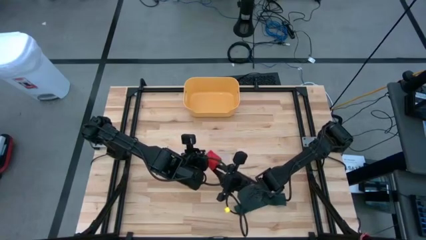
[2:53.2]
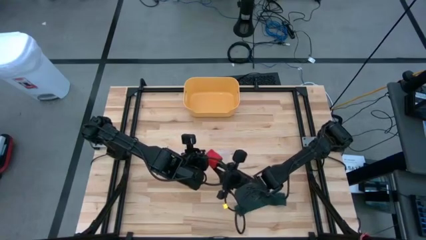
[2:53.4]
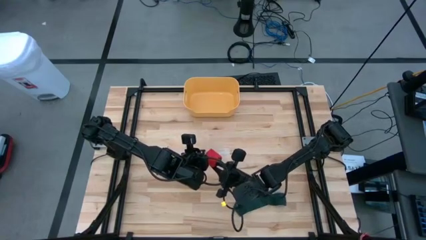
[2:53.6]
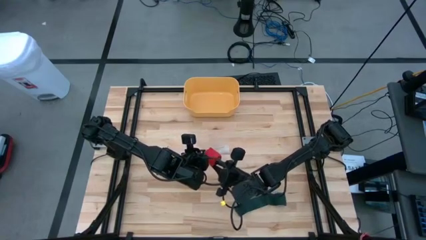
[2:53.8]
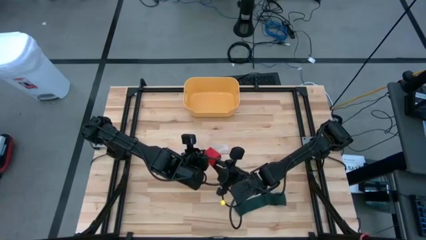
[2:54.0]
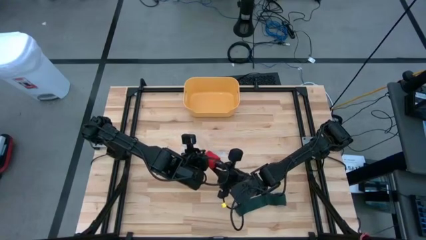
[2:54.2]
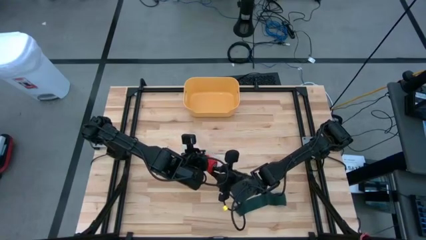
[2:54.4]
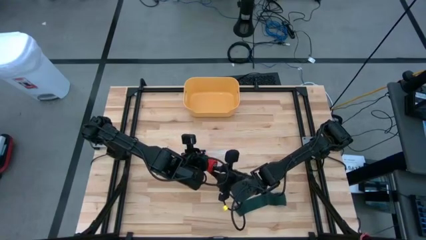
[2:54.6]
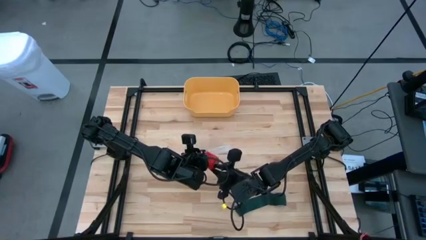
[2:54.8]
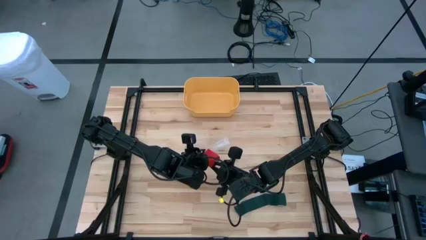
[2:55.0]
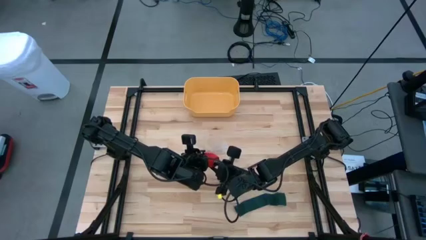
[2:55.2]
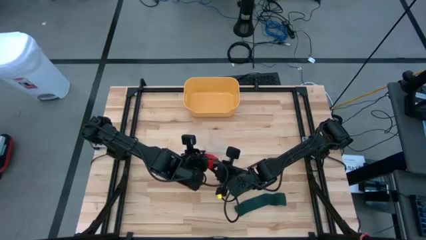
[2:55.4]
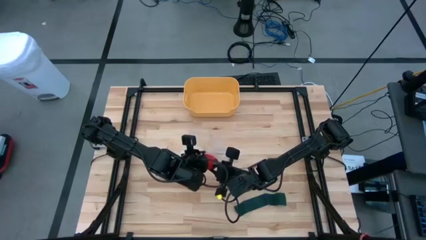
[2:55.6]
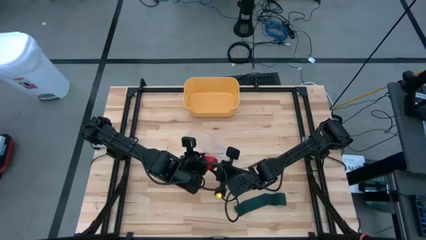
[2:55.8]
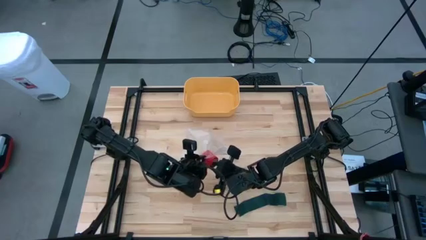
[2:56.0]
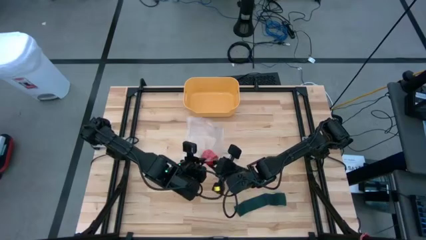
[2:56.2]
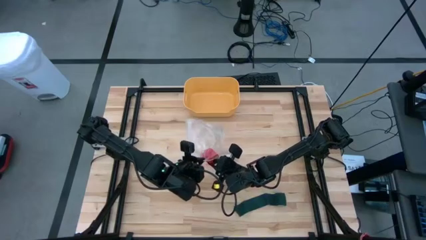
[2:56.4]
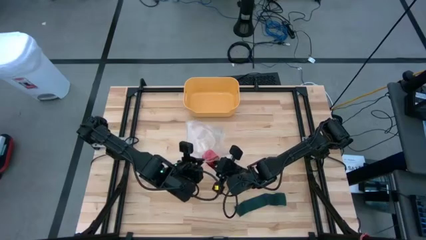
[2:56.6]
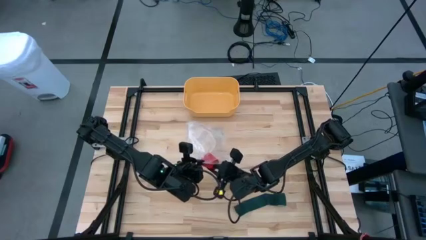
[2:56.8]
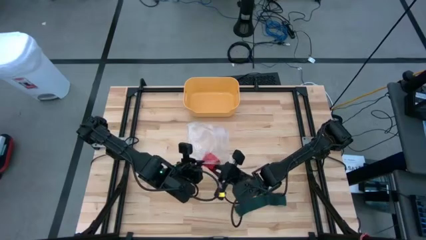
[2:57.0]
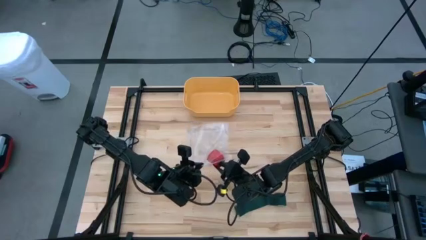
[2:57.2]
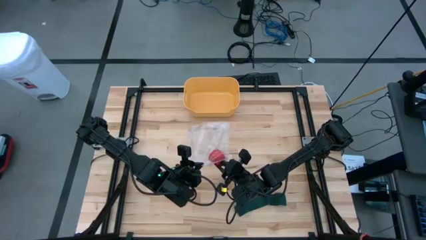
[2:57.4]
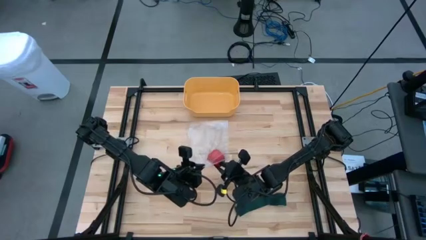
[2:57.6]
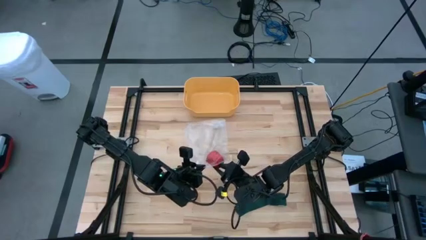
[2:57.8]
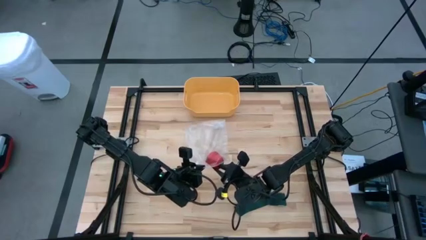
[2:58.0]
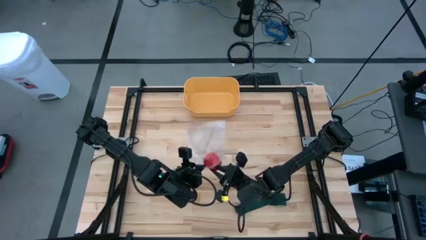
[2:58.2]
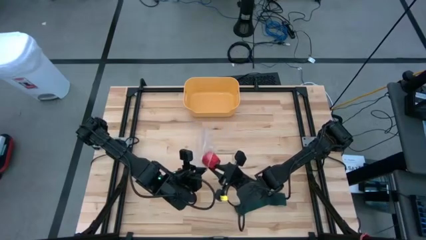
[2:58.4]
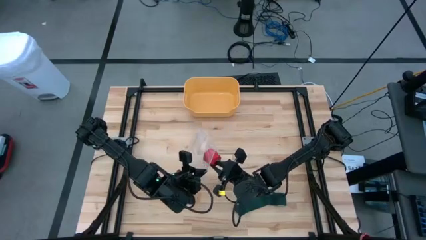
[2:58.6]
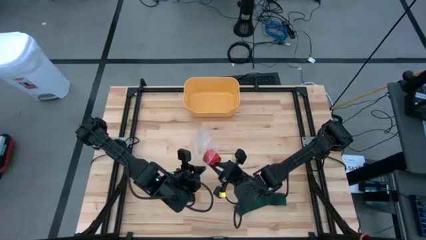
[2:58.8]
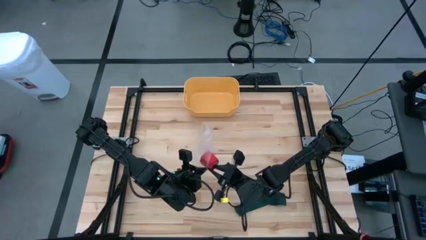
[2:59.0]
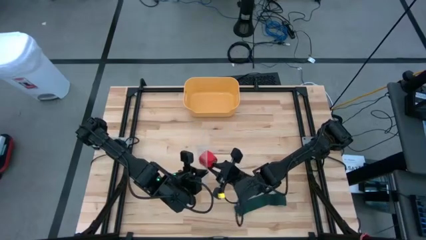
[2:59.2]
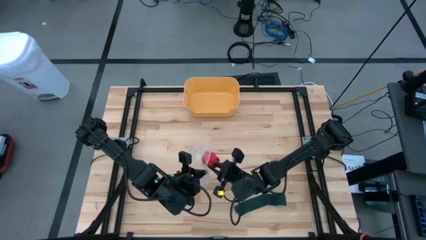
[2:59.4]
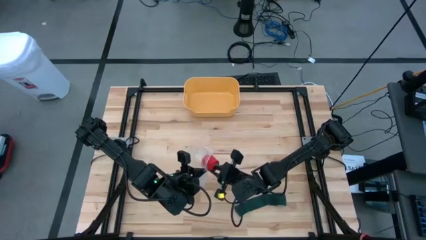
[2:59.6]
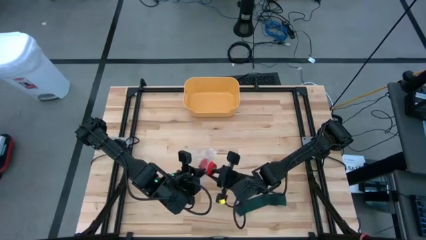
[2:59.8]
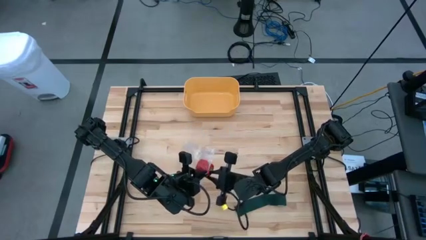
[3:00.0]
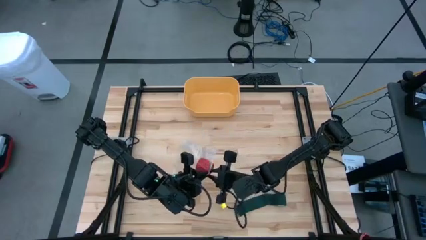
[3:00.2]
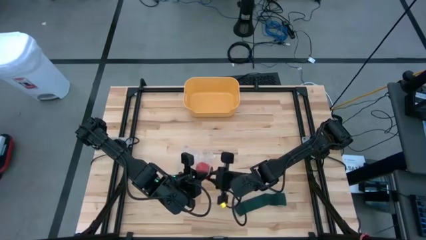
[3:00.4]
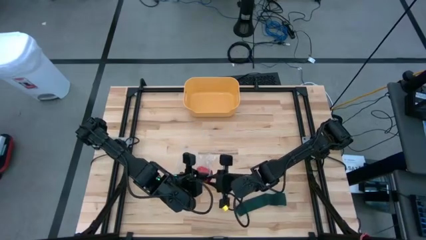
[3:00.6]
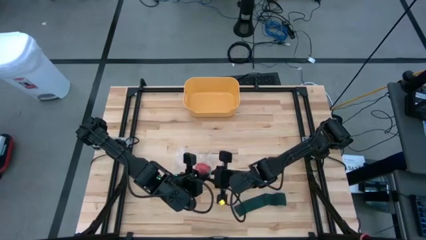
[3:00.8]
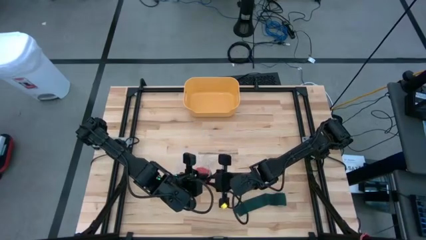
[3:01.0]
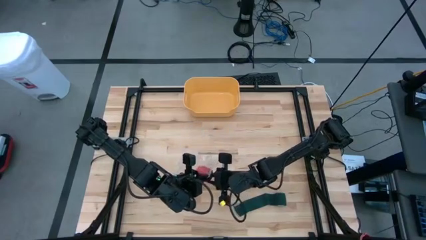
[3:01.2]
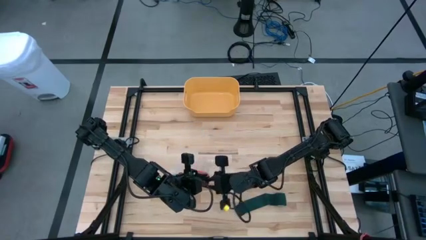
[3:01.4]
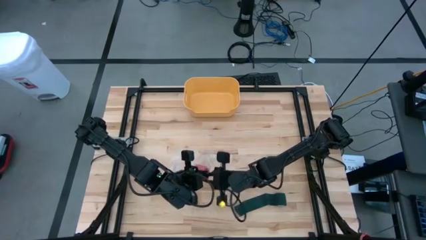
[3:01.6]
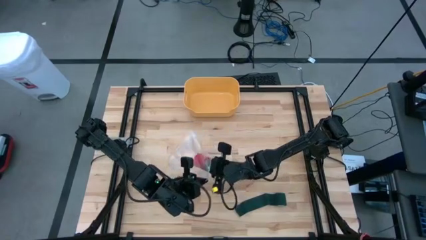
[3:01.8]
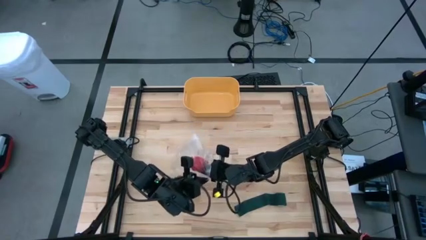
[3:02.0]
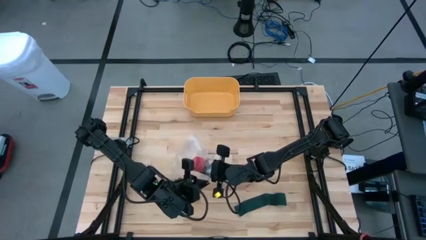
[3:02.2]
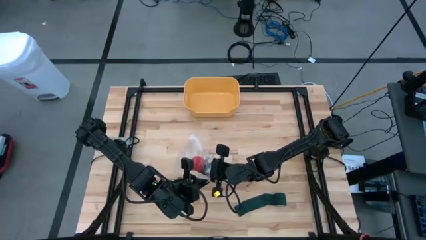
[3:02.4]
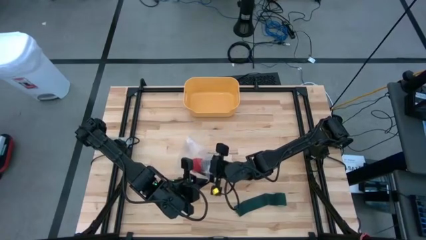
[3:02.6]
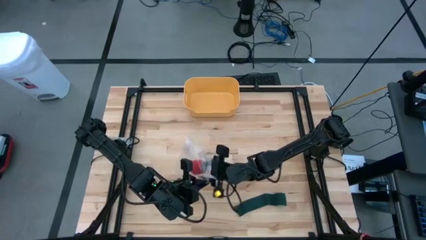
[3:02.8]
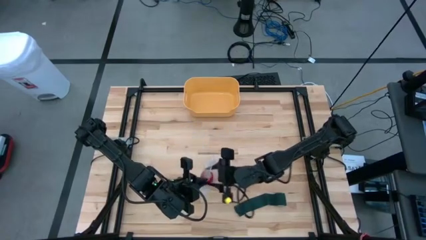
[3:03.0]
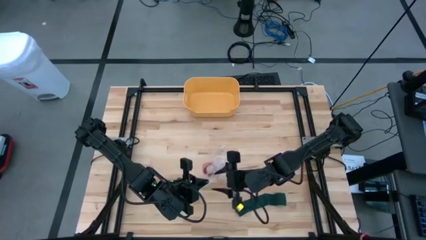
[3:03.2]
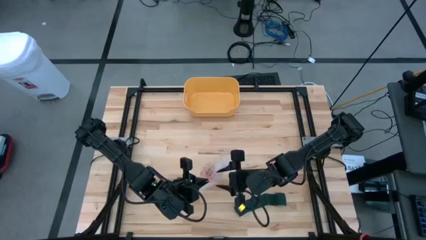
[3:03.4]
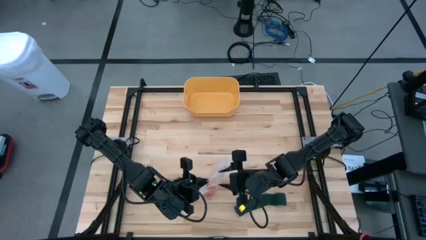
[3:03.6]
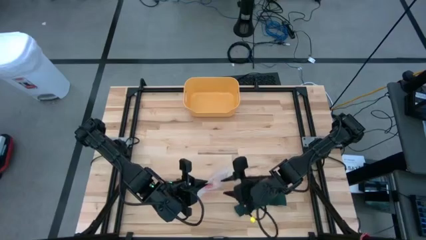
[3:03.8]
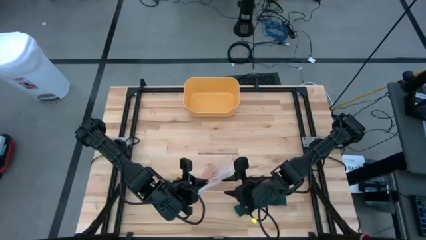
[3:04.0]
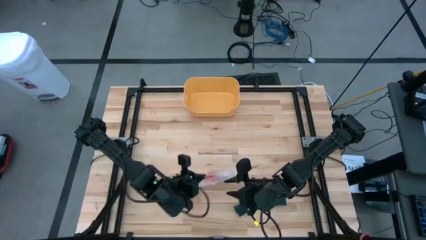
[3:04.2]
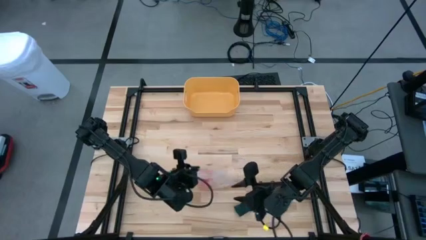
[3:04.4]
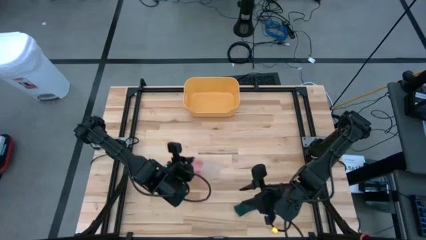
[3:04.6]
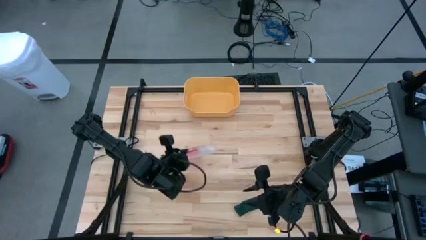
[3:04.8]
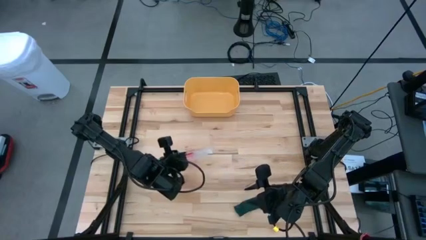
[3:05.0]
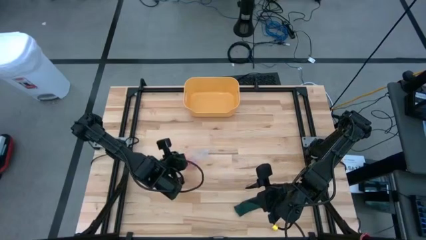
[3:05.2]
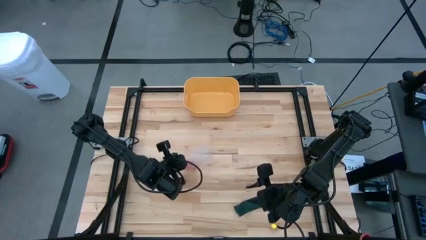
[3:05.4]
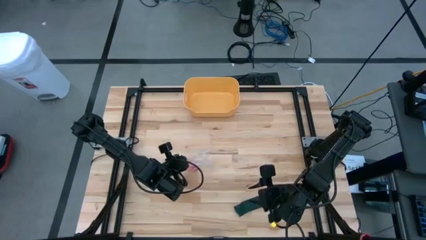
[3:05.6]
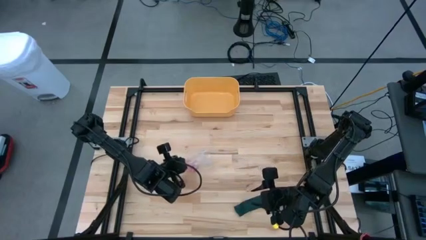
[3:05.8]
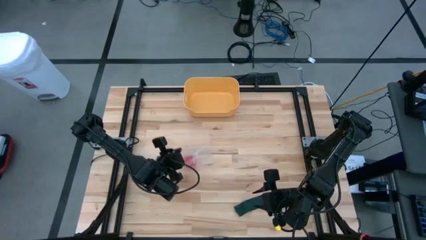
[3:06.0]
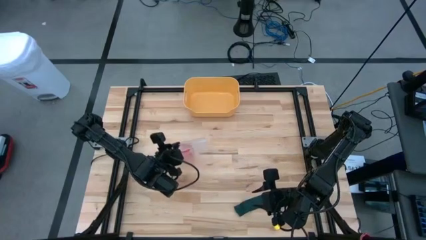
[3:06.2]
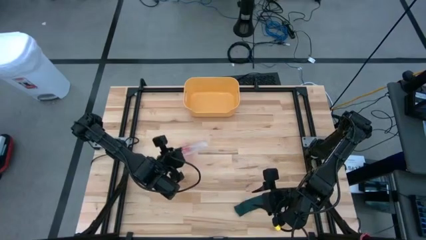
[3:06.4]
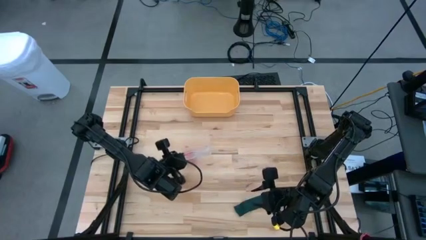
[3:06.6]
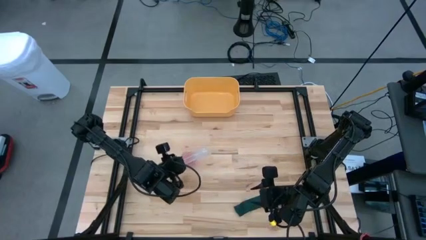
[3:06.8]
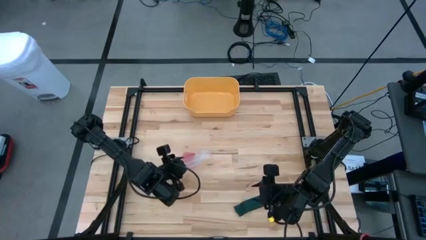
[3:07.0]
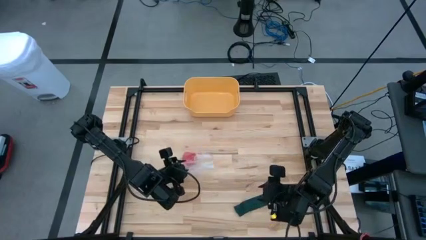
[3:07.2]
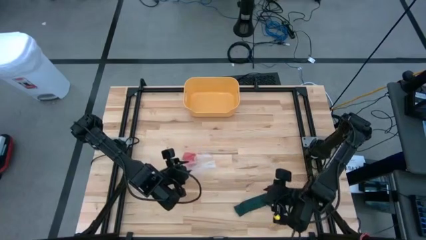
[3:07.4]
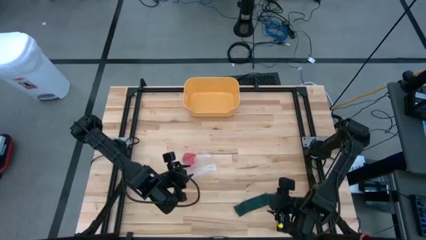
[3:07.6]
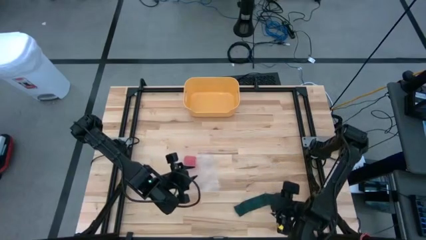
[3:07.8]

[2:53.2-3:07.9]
Task: Roll bandage
Put the rolled red bandage into the transparent zip bag

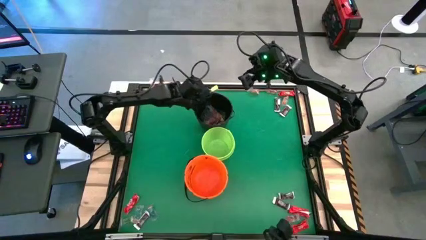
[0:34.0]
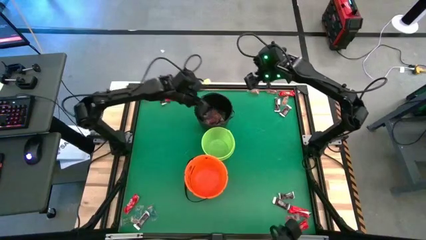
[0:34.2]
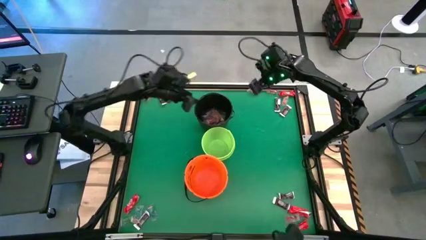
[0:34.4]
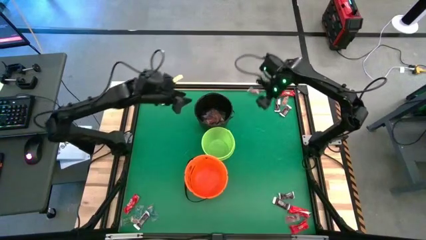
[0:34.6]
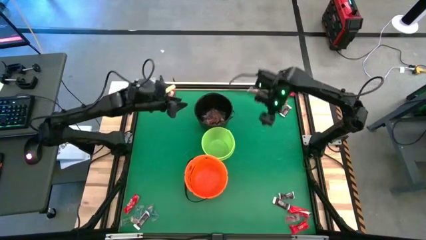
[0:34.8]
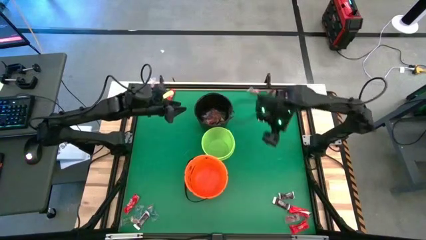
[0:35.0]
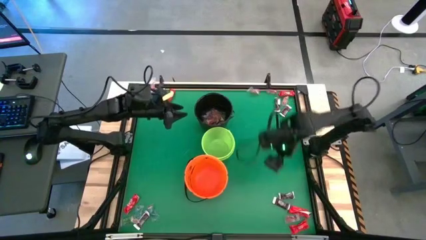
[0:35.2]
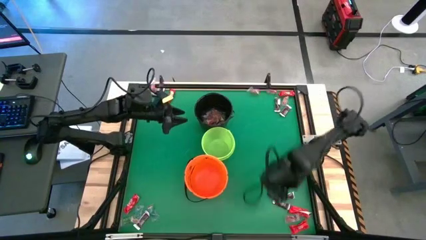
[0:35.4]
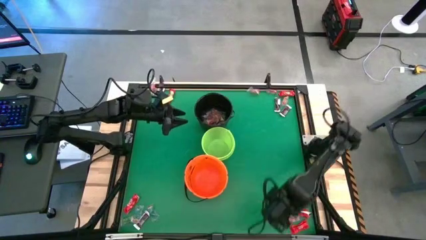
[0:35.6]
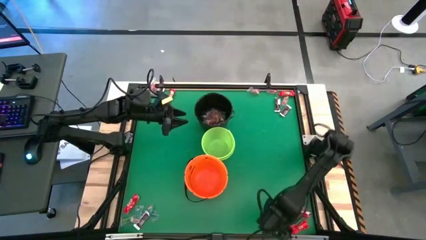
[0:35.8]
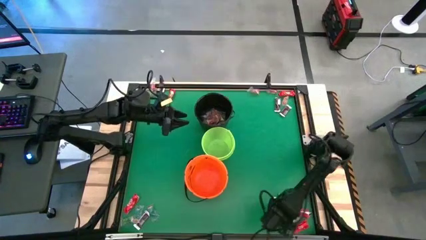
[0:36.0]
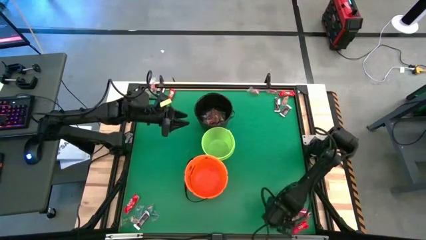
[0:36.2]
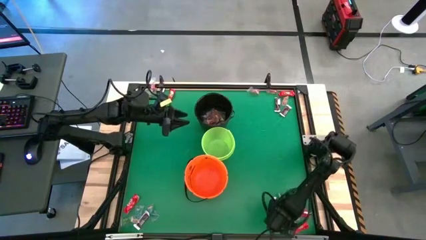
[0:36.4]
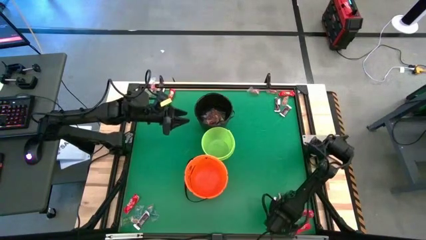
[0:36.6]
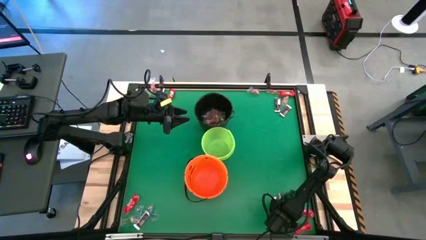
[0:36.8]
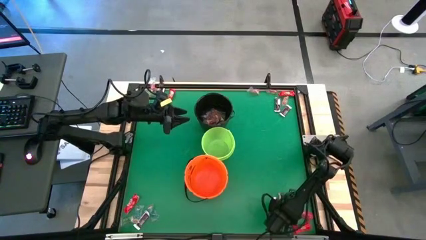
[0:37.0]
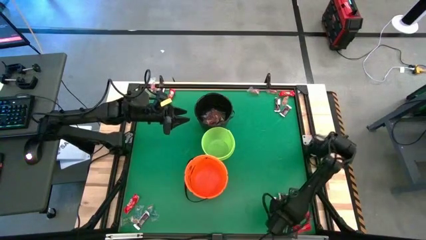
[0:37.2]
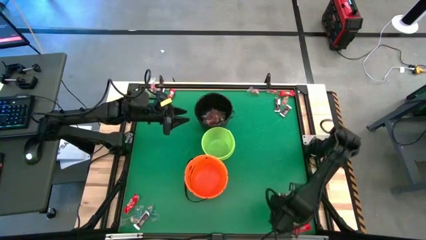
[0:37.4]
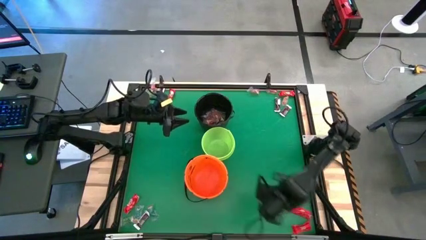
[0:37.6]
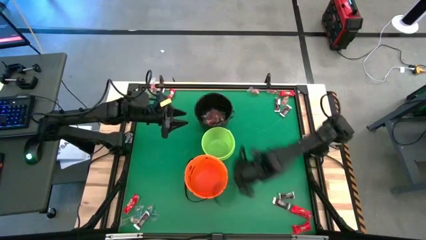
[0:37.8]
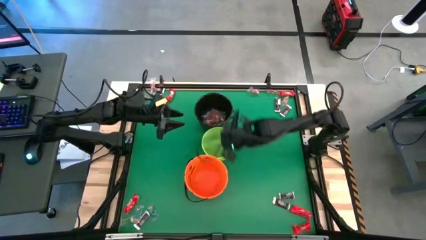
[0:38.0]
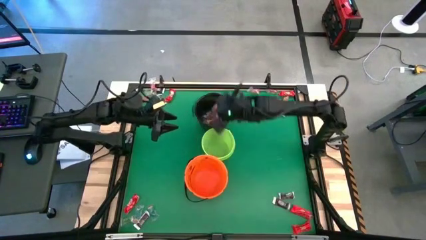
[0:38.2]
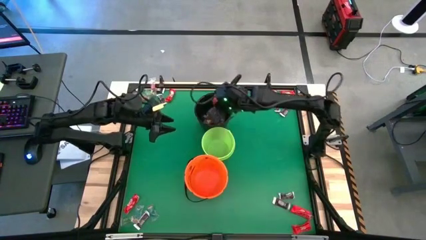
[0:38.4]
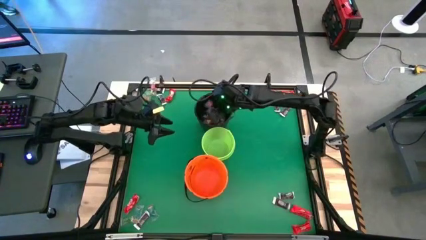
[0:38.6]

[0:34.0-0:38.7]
Task: Sort candy by brand, put in halloween buckets
Put the red gummy into the black bucket
